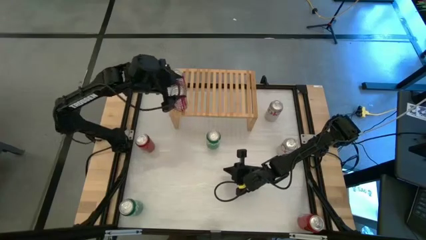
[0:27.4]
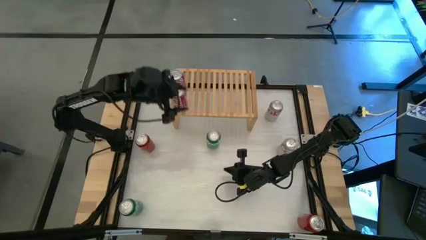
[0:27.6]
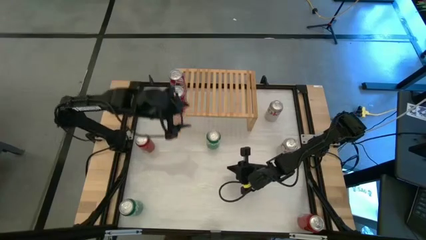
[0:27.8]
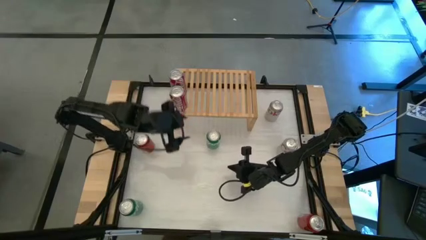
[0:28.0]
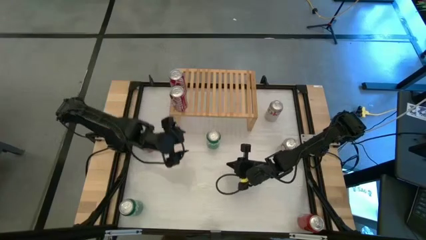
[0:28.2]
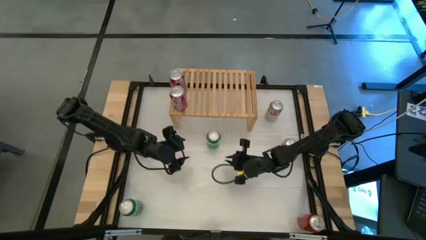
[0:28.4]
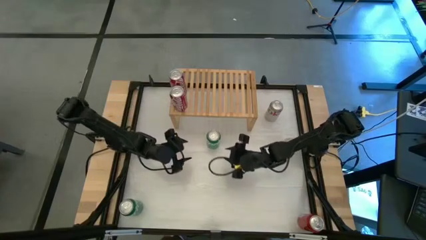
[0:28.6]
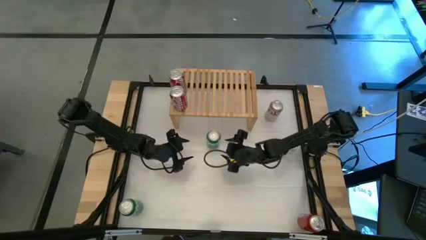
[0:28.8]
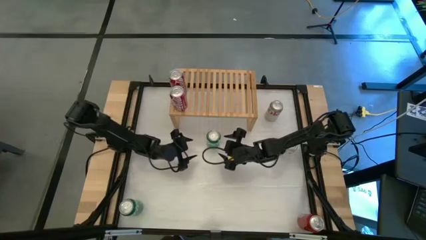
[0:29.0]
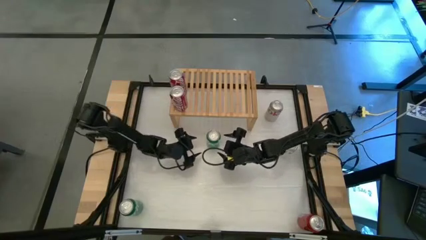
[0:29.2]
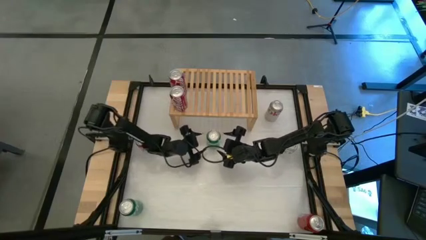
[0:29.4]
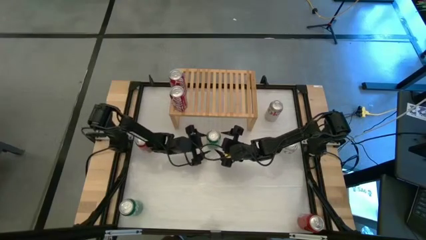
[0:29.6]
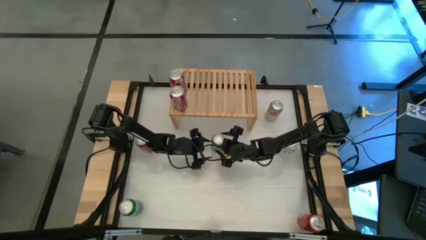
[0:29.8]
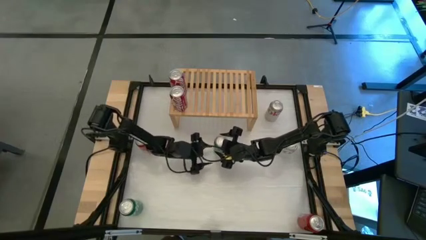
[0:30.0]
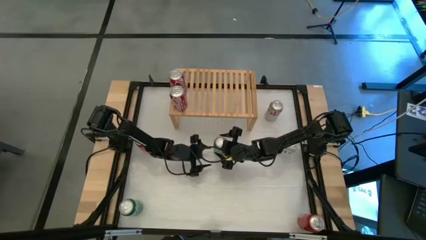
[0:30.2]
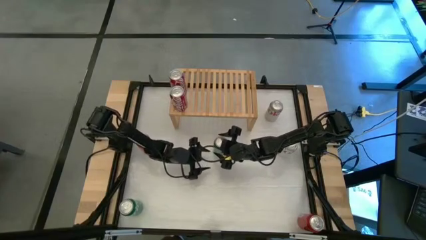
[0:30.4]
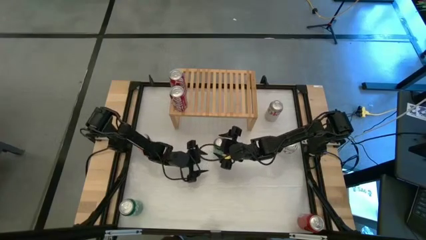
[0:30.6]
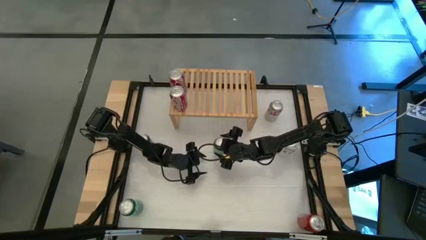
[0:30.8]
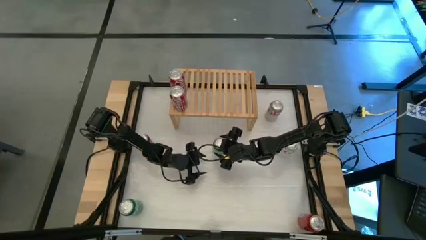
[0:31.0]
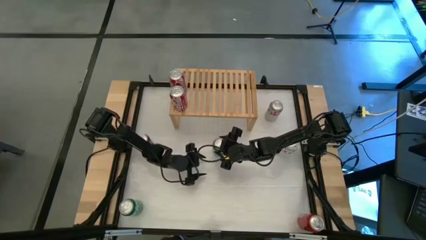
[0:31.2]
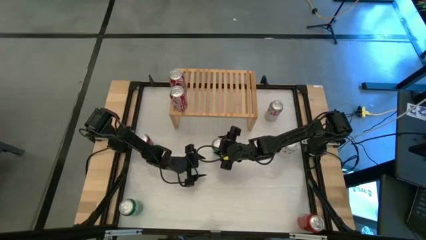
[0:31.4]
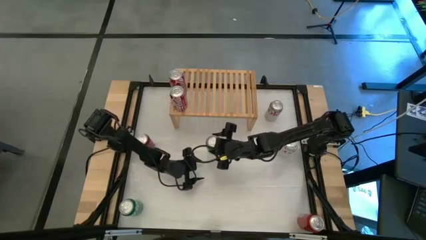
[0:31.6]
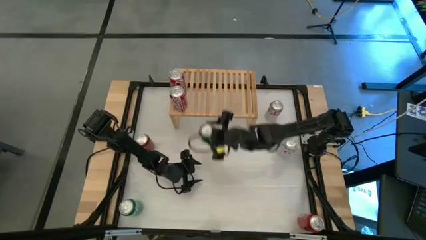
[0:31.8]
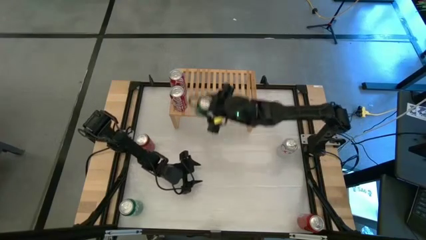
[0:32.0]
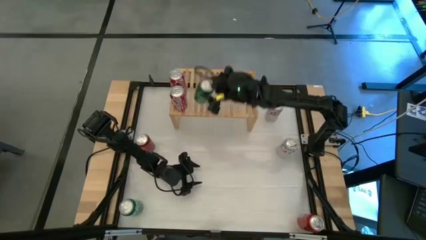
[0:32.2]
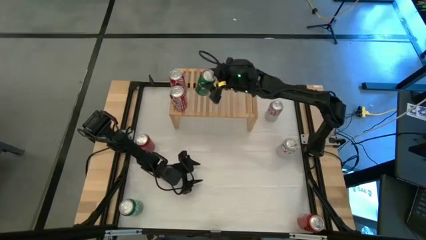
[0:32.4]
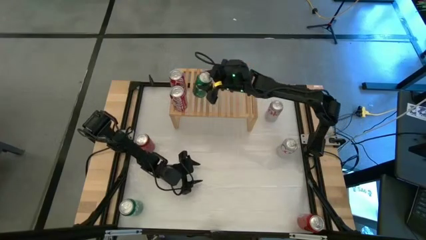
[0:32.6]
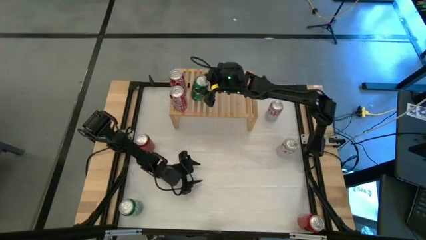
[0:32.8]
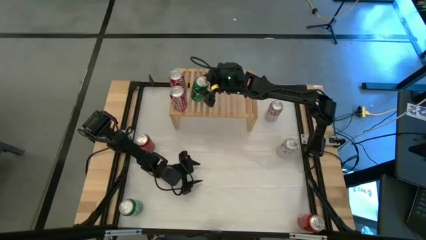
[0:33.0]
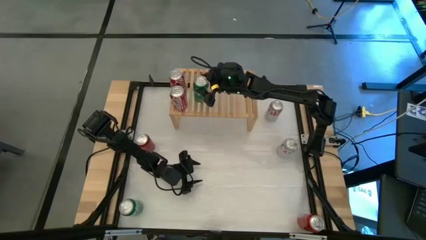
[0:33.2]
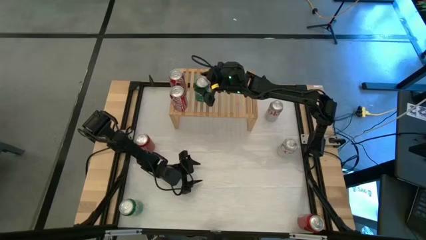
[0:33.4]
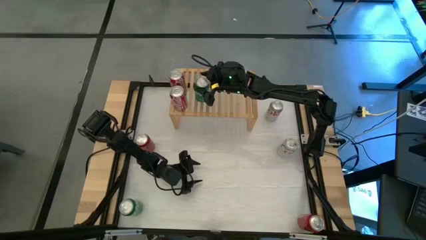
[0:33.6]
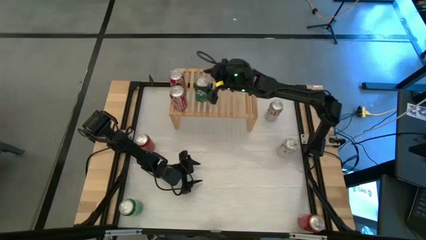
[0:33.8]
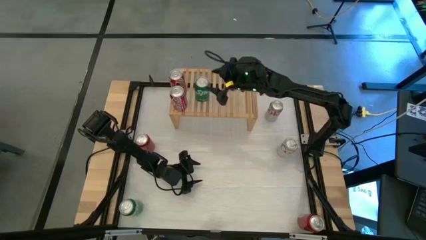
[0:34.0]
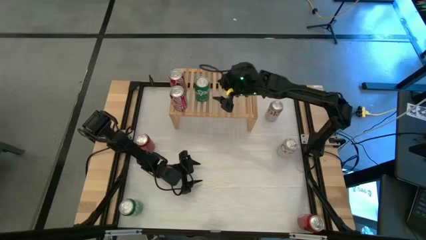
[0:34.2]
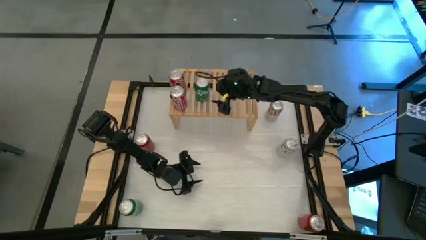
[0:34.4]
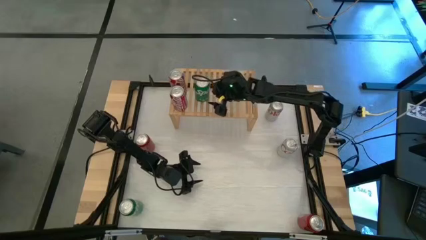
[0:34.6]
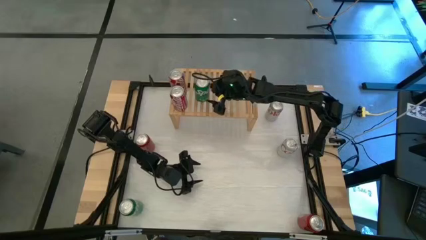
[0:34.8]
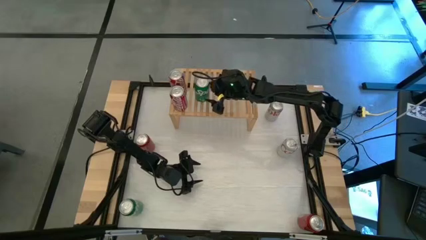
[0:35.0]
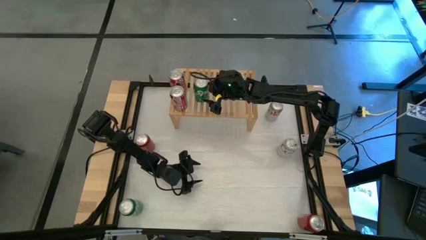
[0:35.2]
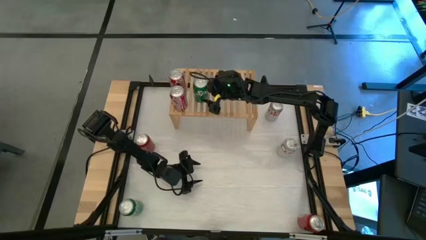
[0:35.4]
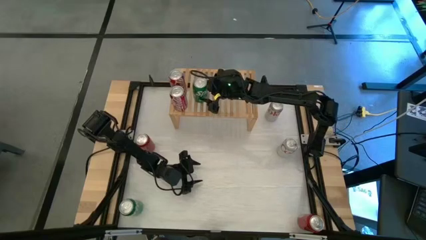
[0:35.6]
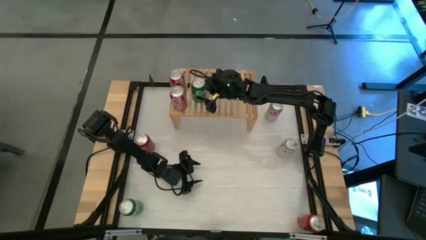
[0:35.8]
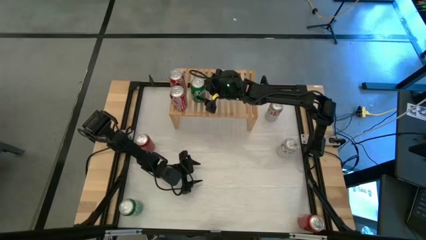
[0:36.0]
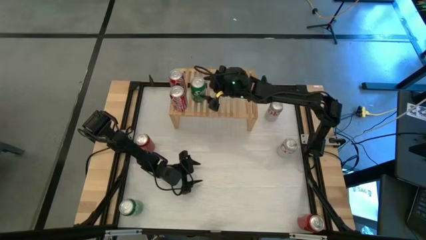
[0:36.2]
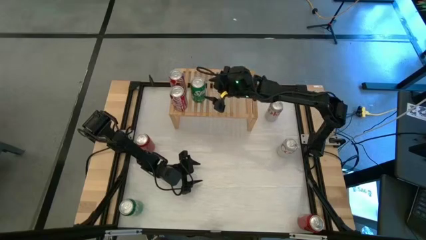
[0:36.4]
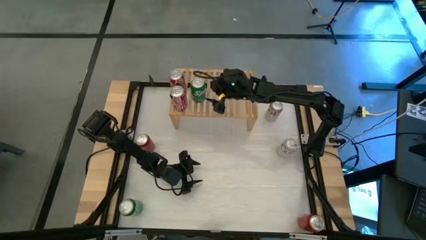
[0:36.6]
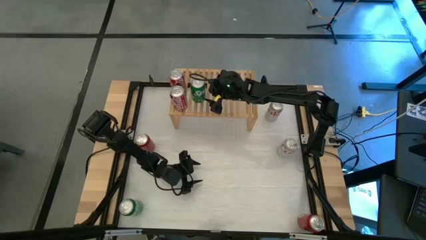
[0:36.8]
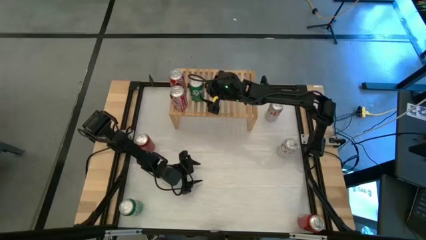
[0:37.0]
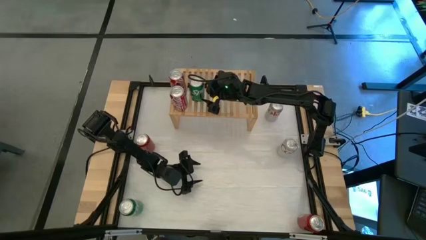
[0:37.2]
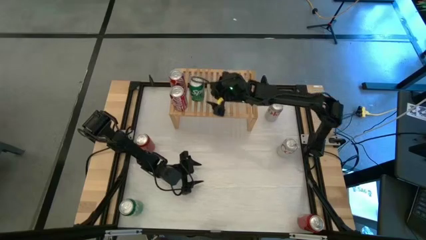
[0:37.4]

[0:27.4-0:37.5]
Task: Place canned beverage on shelf
Put the top green soda can on the shelf

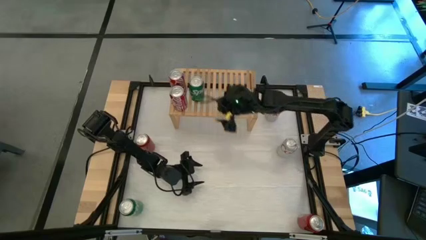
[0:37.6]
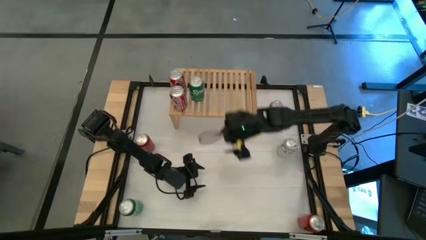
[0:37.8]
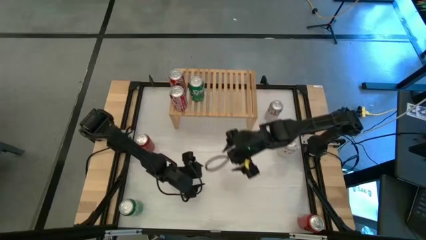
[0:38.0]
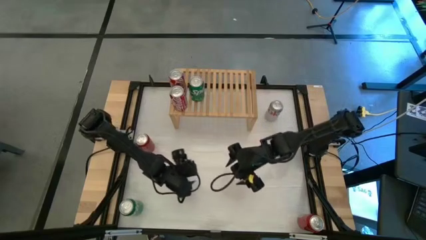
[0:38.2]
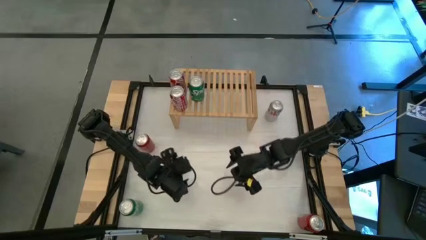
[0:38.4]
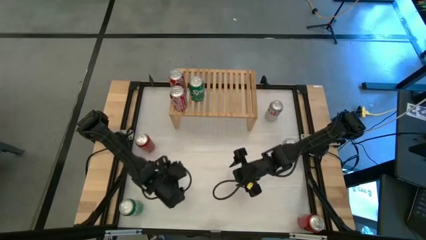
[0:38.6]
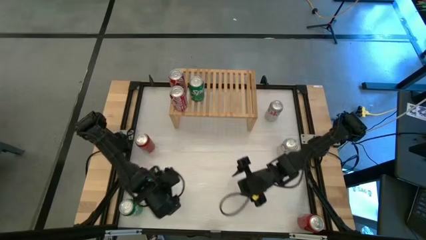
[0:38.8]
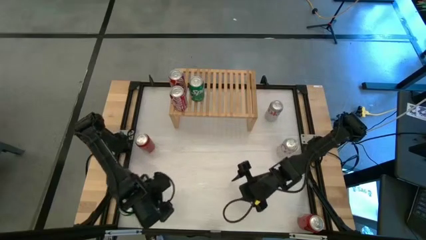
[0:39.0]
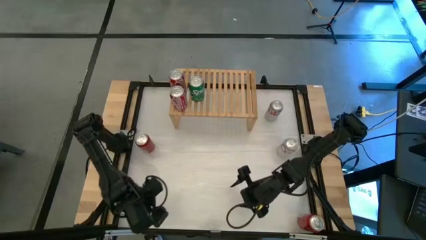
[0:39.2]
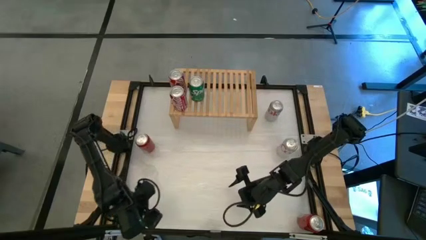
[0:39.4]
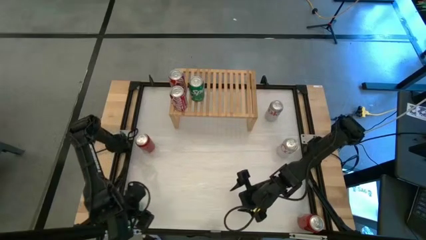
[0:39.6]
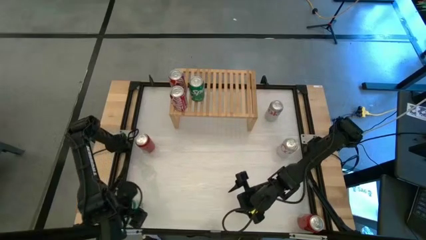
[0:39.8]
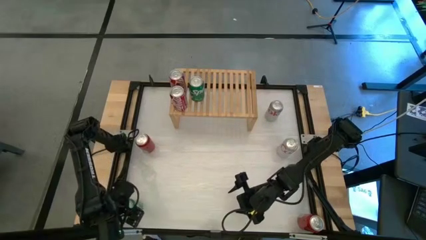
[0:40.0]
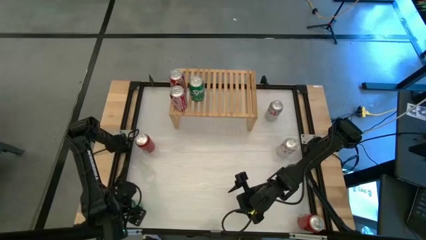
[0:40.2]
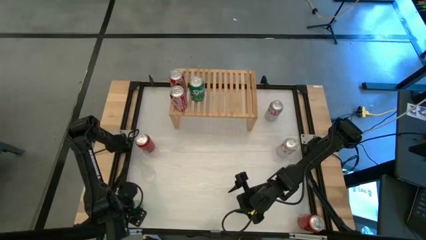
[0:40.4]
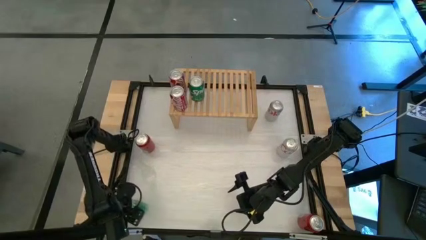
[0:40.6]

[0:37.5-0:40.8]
Put the green soda can on the shelf
